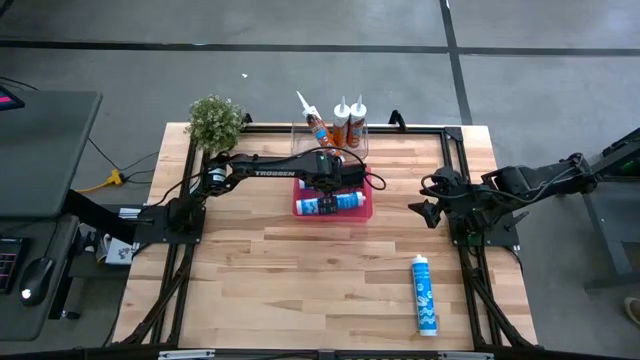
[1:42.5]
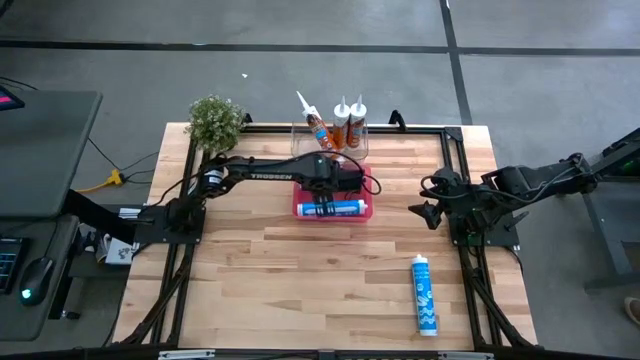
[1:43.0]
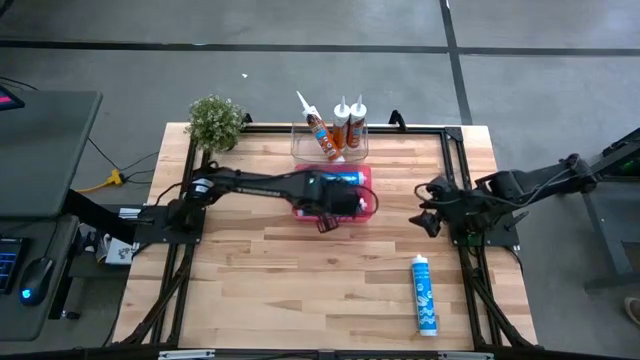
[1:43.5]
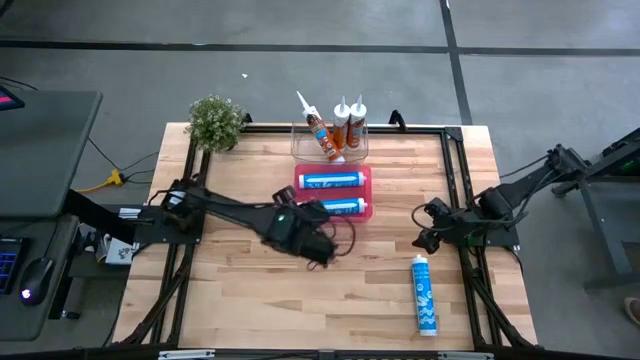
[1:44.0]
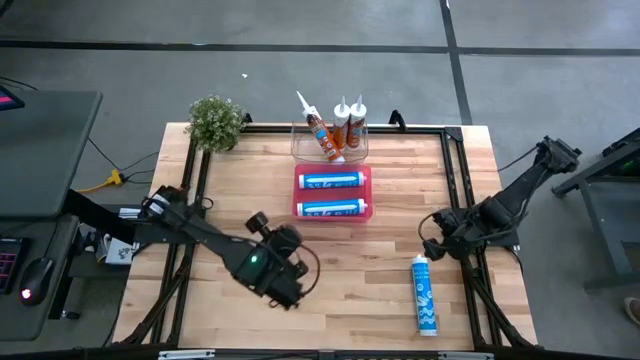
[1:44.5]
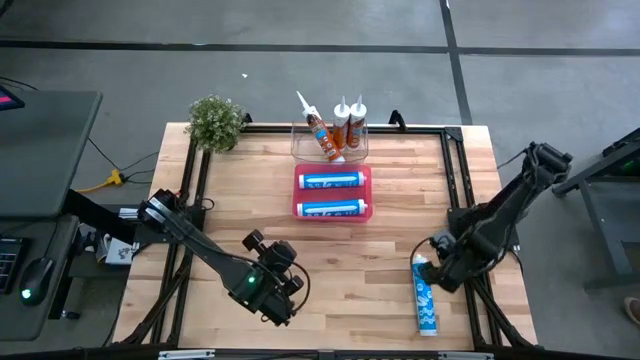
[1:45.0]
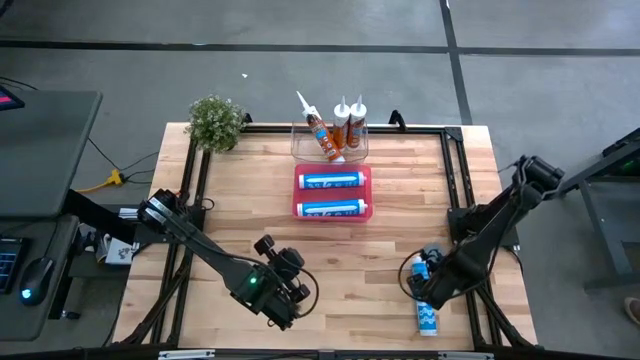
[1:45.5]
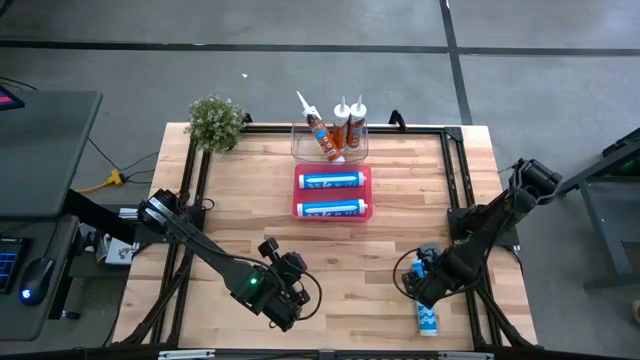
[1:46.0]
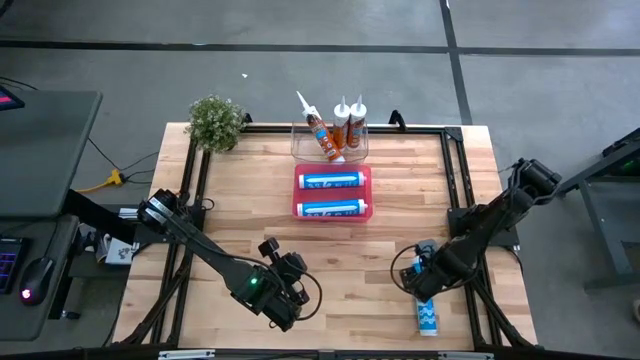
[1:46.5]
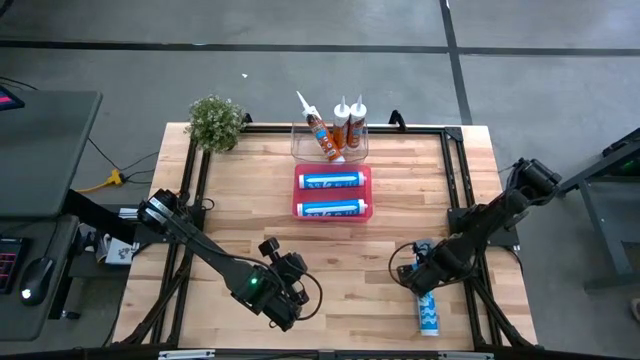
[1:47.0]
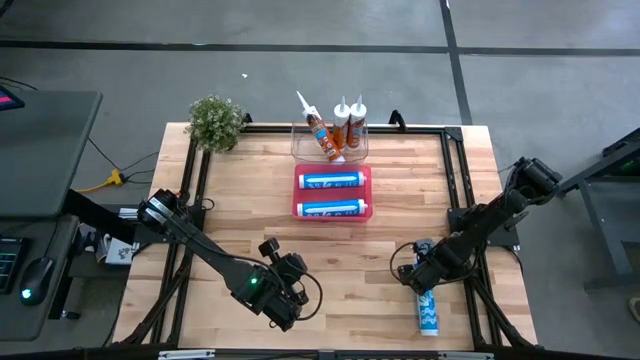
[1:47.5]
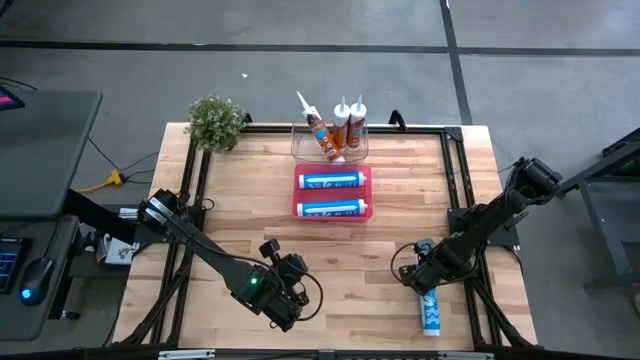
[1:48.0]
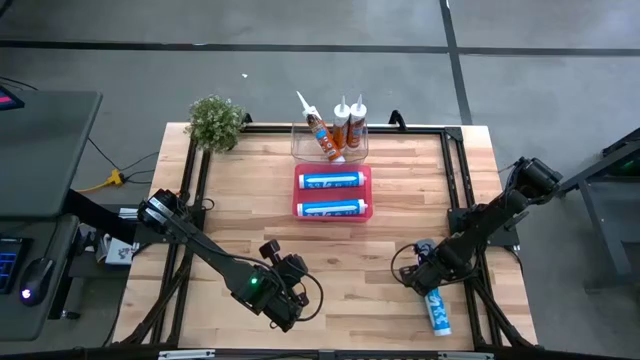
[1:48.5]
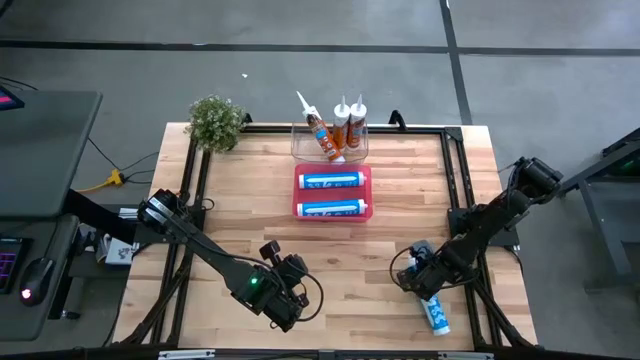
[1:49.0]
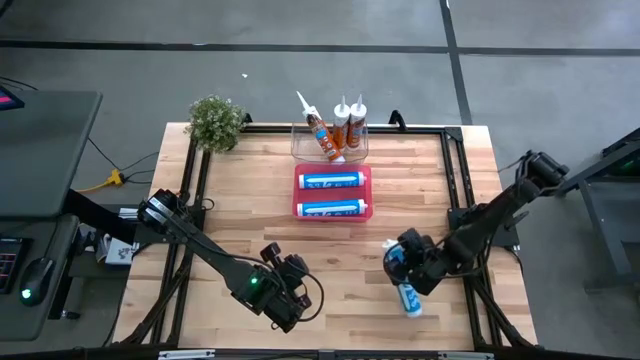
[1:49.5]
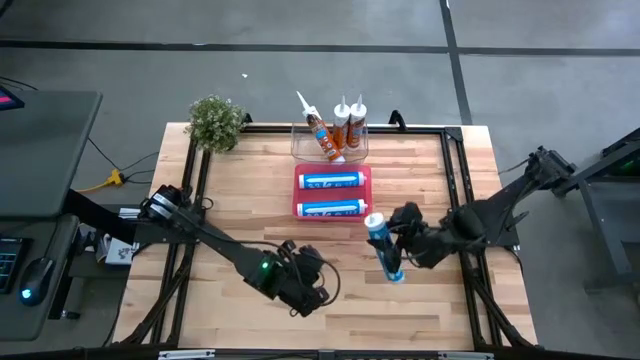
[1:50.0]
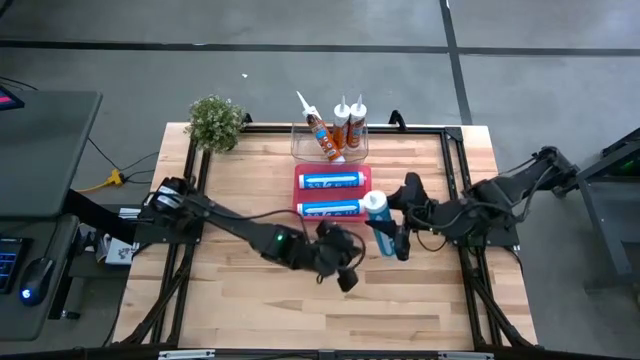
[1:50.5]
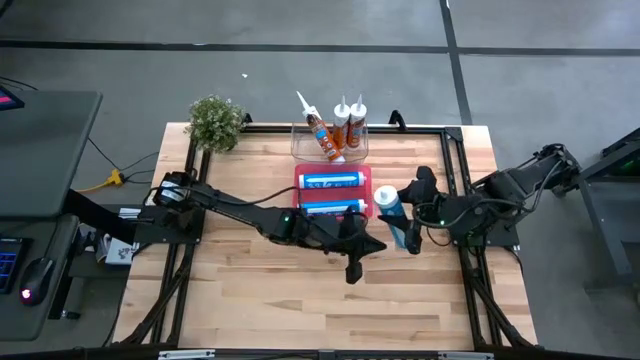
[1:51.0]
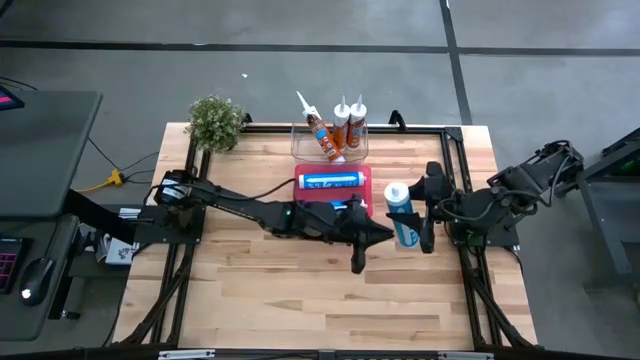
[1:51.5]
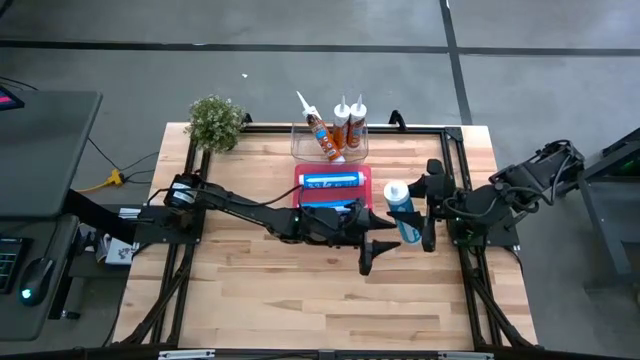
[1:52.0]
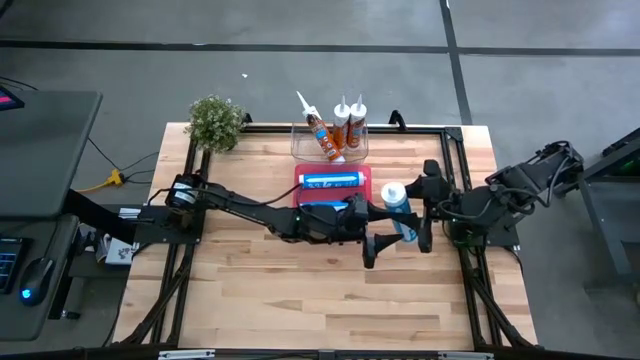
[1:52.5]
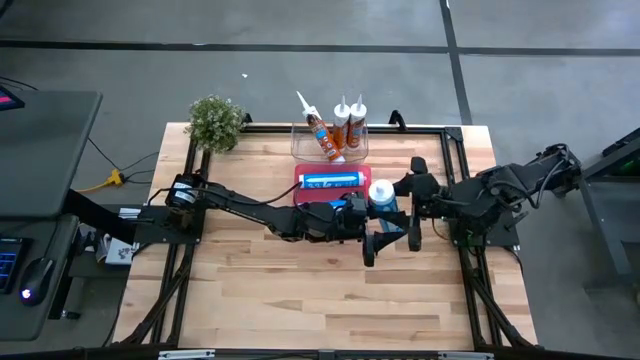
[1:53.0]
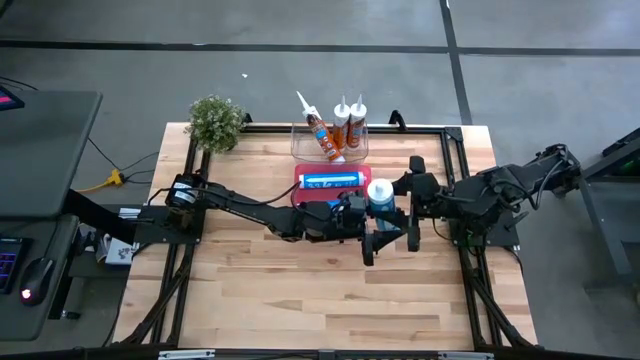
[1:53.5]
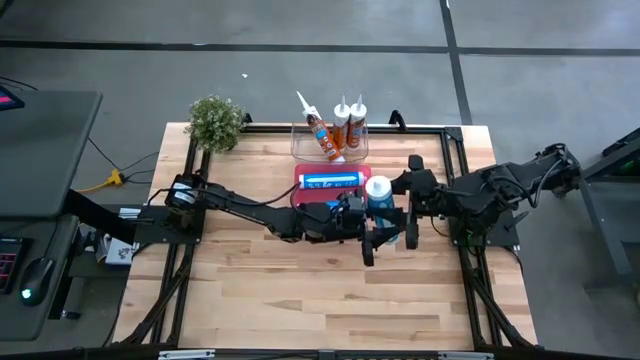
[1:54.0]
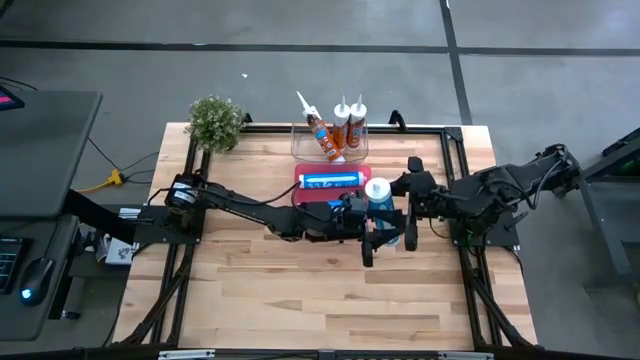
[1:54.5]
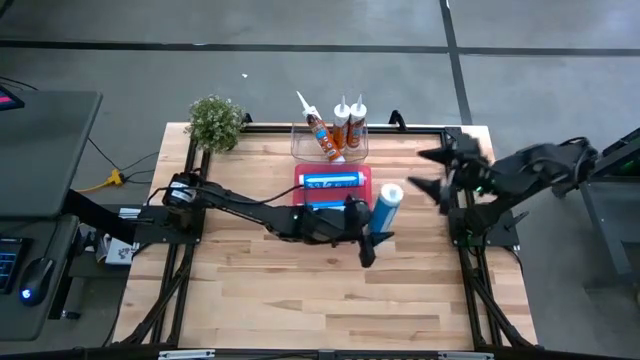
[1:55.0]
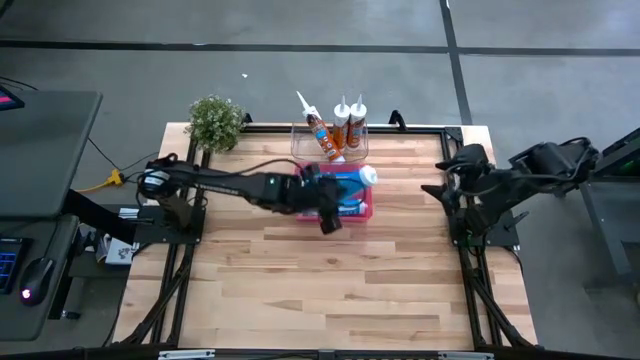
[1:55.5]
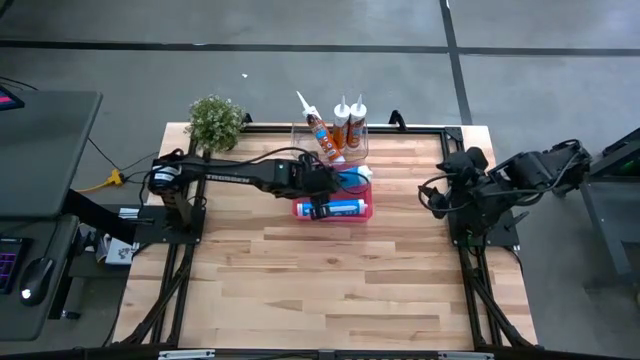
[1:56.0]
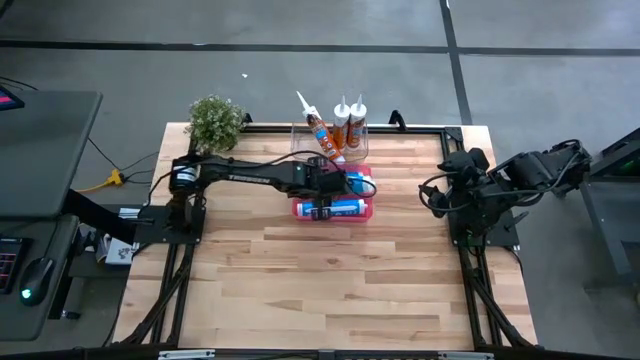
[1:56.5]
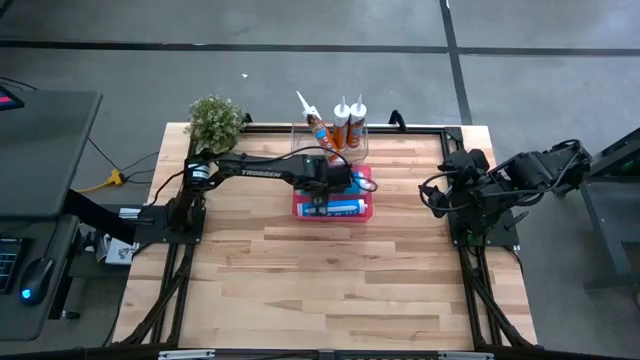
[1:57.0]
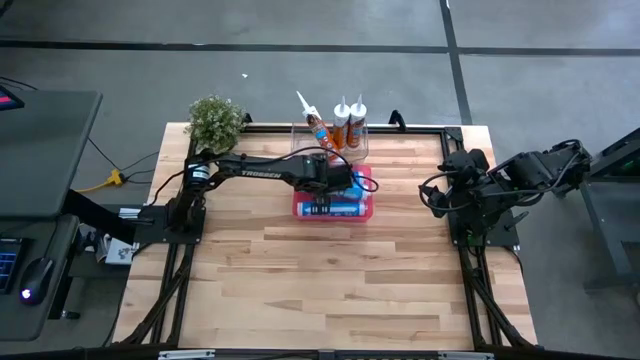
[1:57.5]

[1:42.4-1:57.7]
Task: Pick & place silicon tubes, Sealant and Lysol wipes
Put the blue sealant into the red container

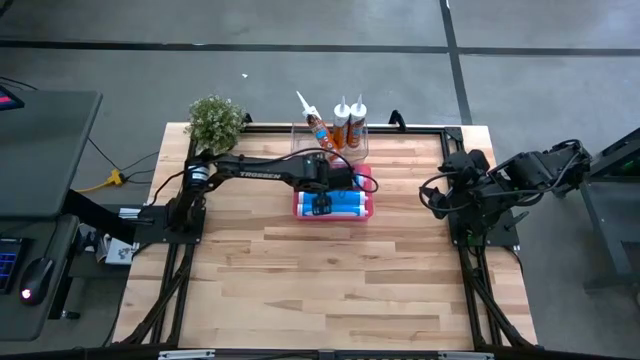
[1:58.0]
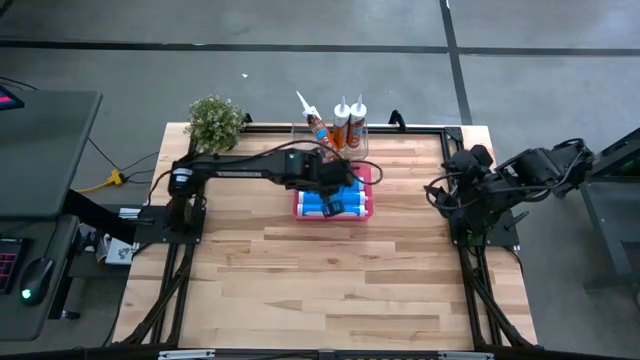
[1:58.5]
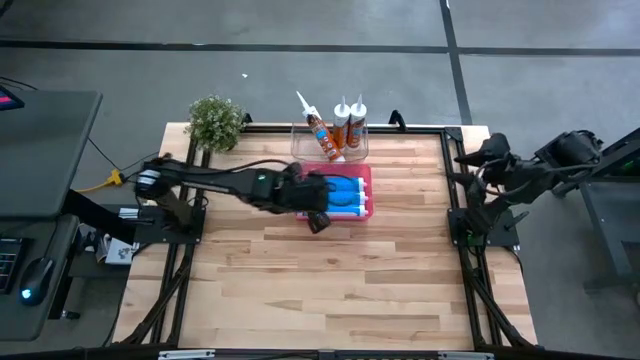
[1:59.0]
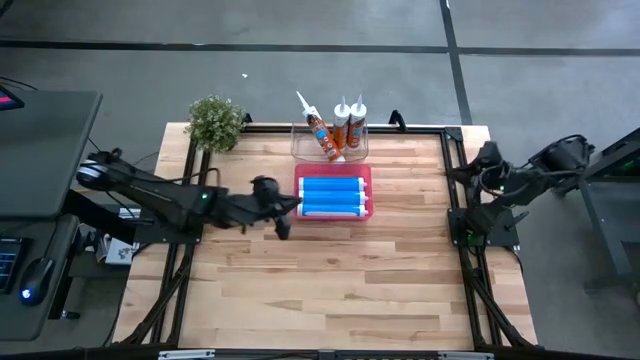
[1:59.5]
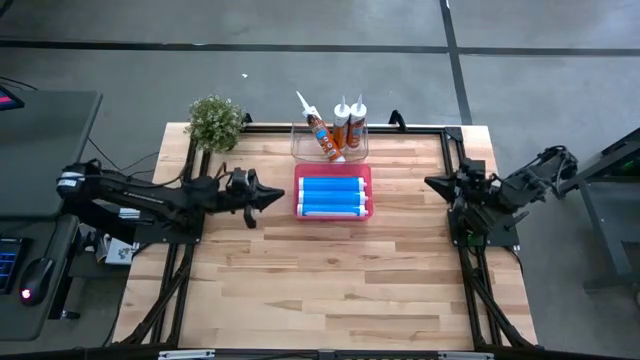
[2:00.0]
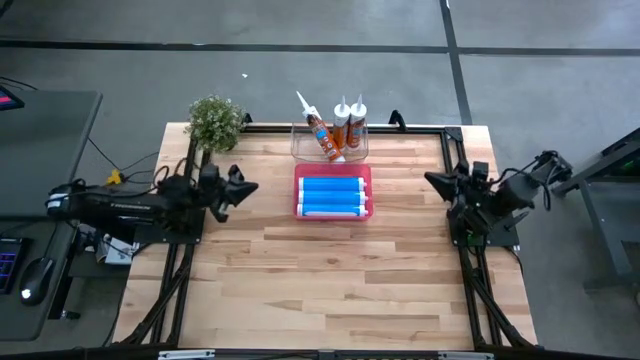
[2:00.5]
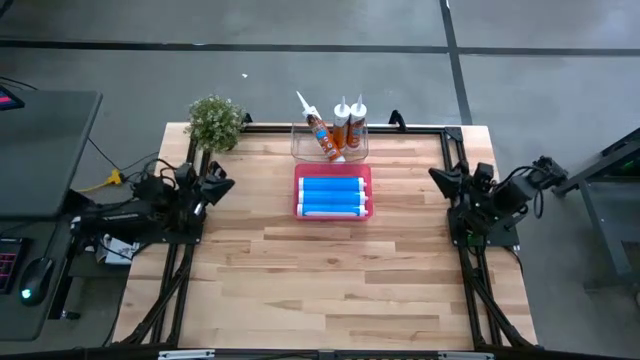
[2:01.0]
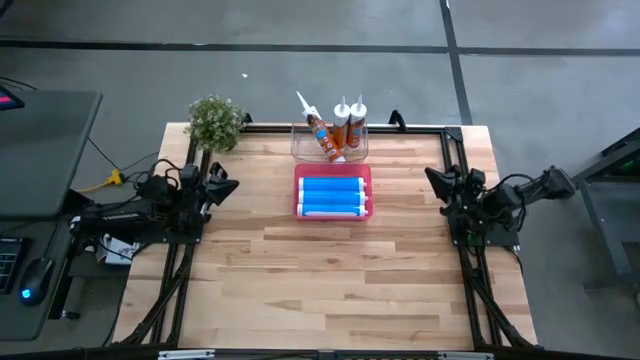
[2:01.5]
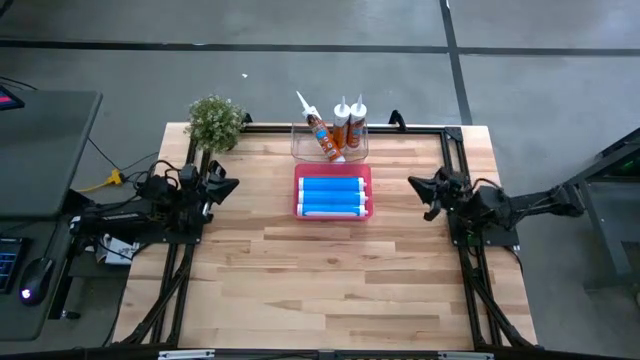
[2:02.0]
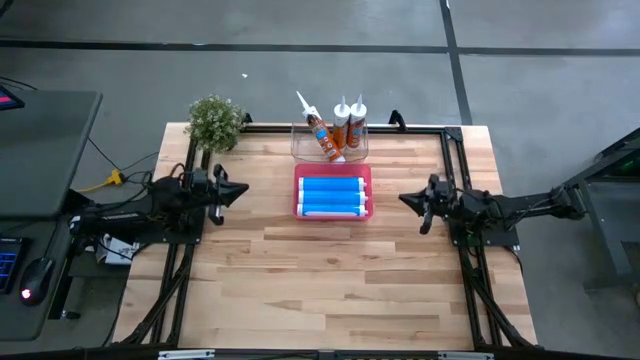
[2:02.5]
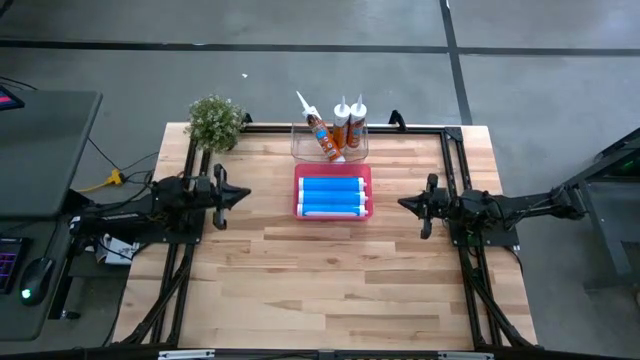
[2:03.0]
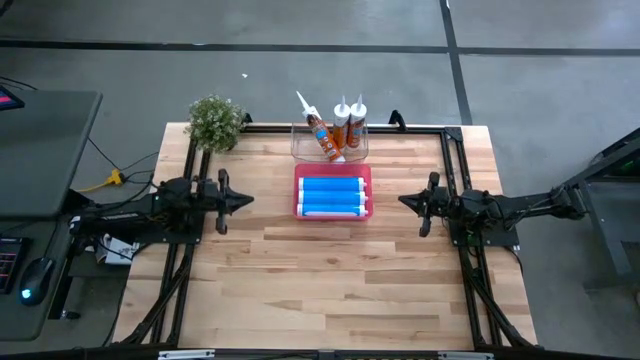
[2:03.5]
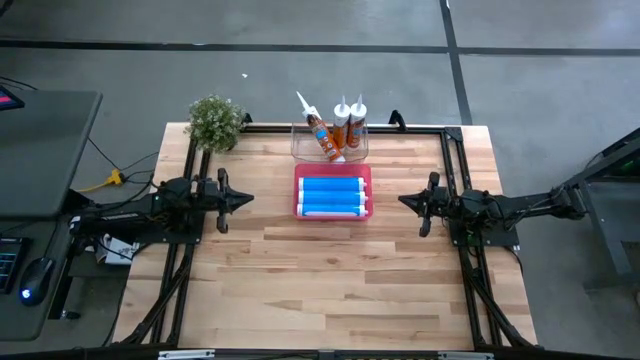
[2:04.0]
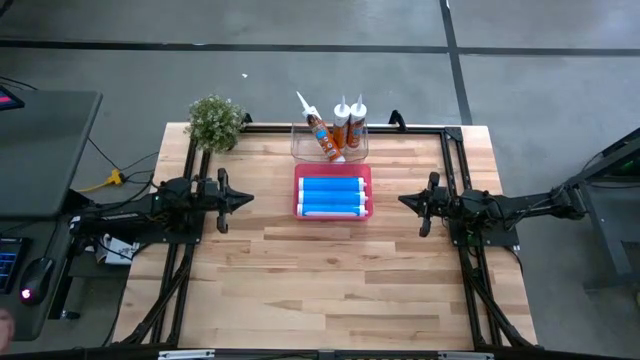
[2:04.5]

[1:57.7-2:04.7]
Return to home position
